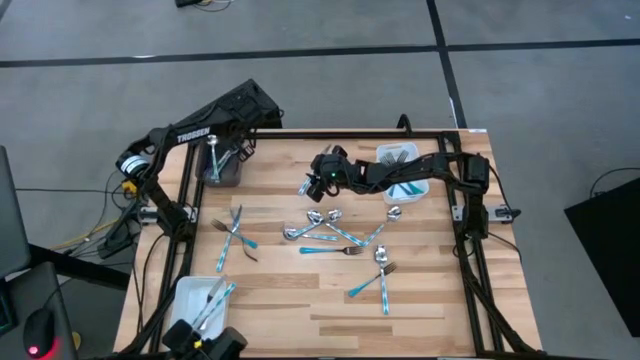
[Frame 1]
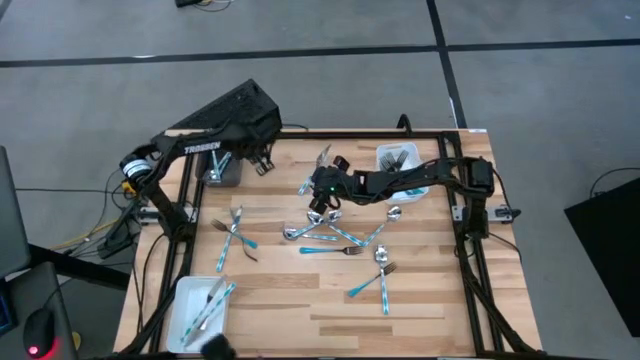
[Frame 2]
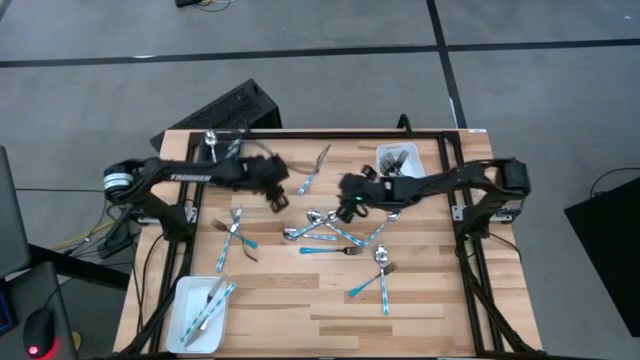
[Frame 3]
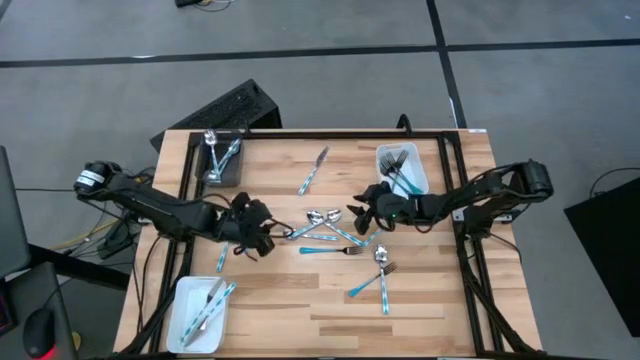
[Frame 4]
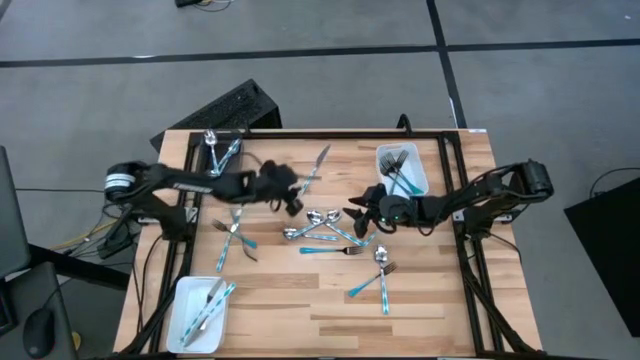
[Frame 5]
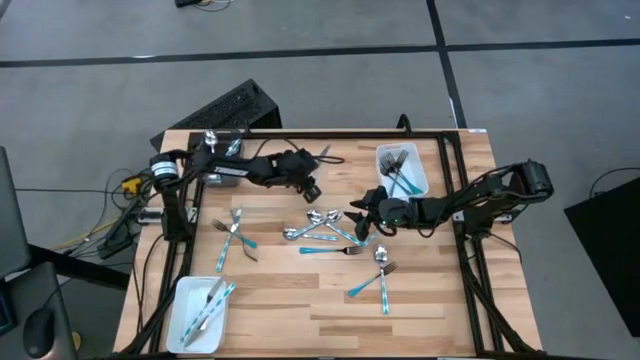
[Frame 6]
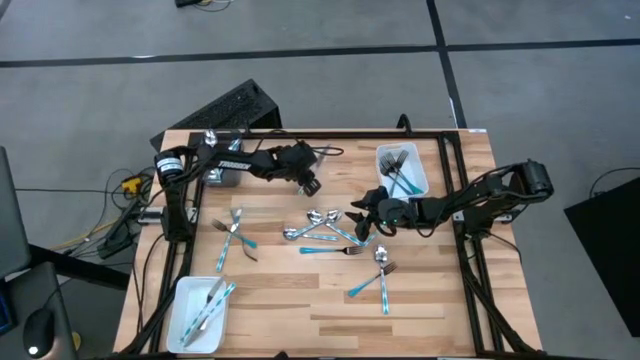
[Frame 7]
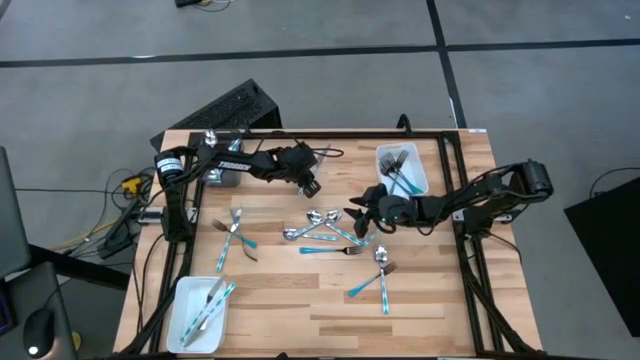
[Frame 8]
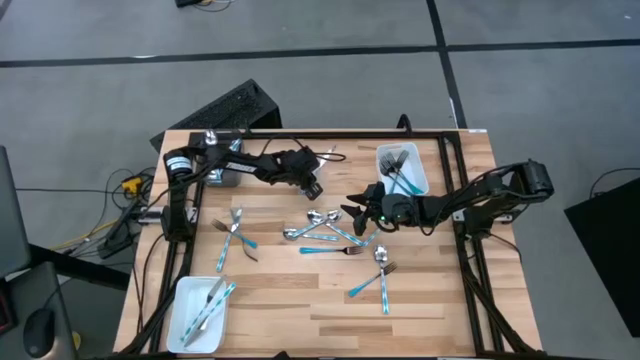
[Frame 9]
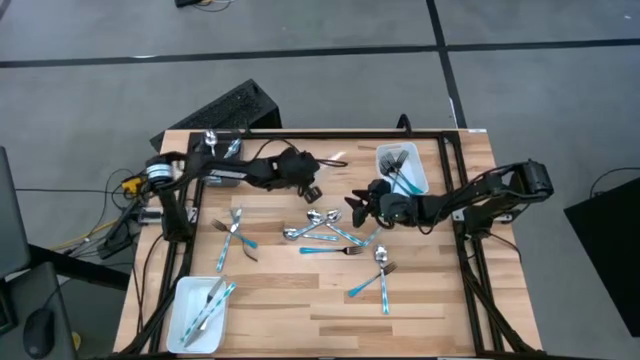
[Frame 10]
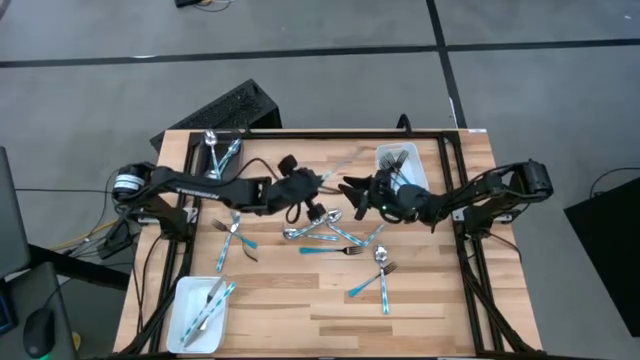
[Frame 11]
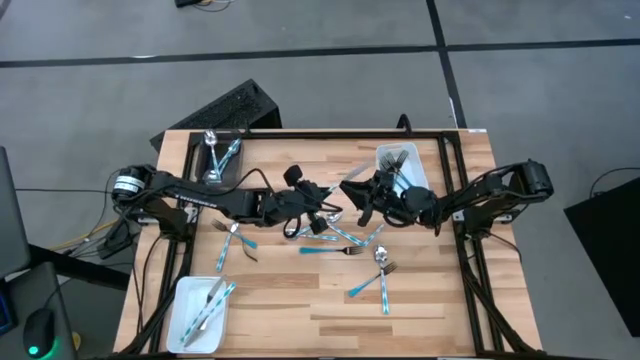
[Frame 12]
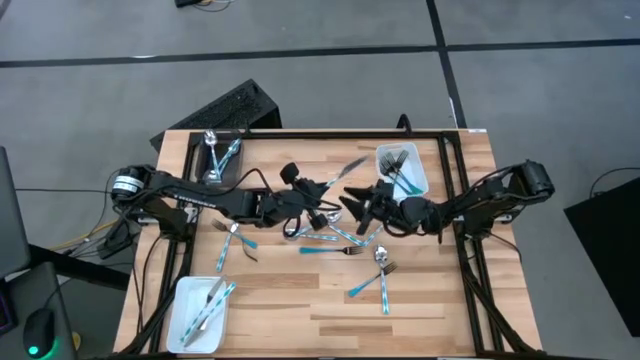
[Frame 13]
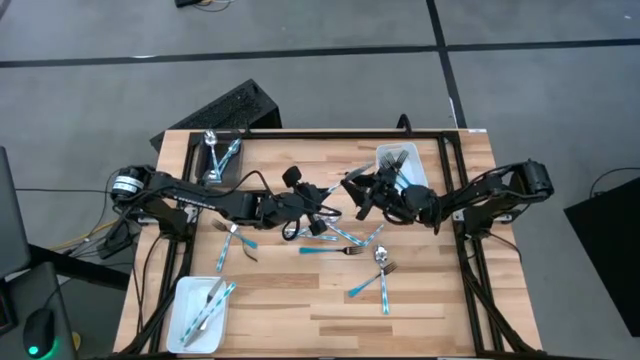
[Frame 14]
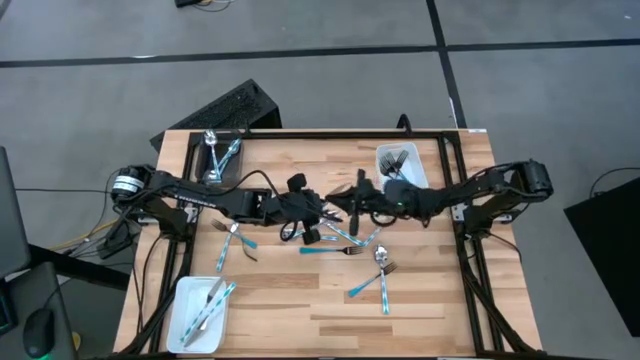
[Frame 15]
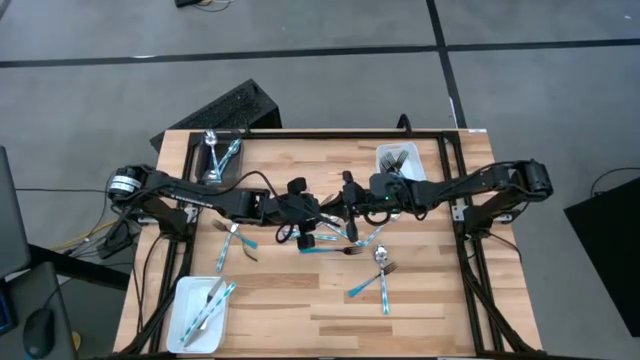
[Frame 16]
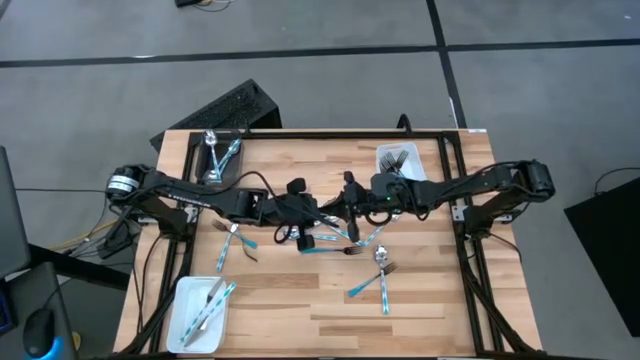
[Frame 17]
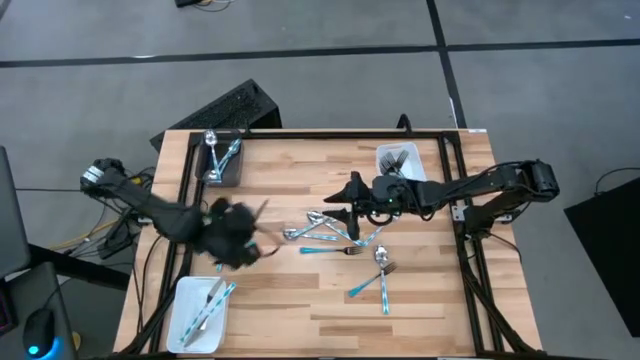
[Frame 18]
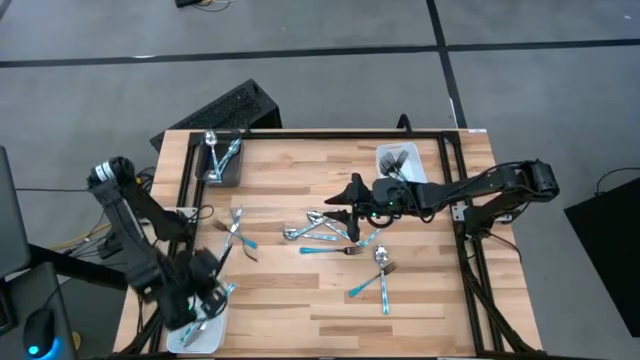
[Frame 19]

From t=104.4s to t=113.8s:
Task: Sort silverware by color (type)
Put the blue light table knife into the bottom white bin

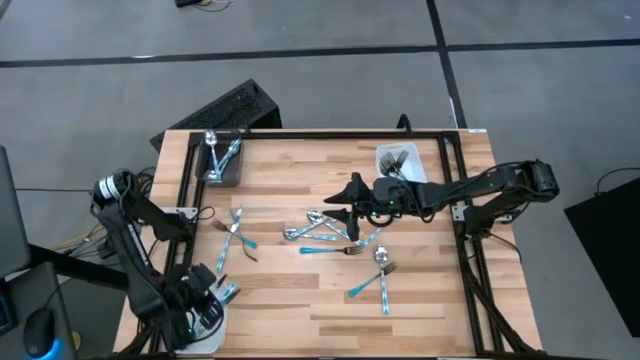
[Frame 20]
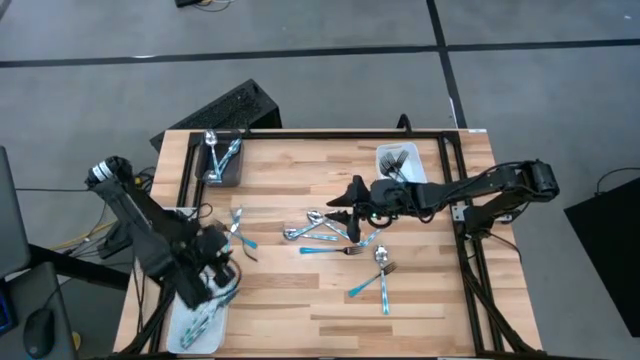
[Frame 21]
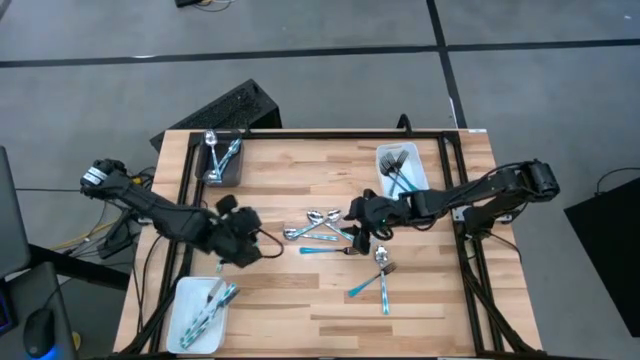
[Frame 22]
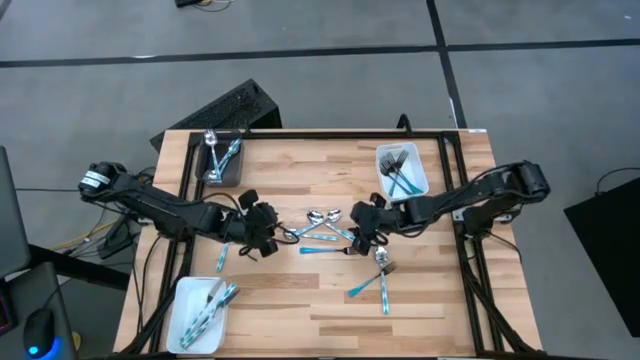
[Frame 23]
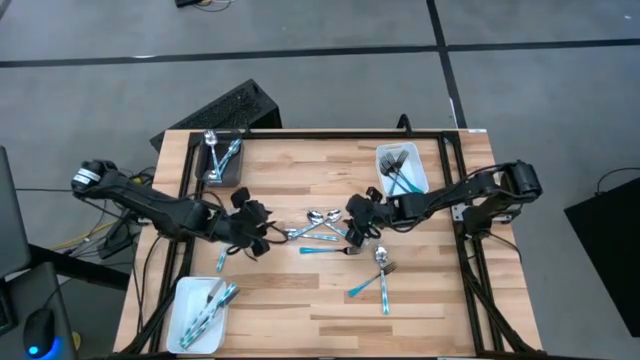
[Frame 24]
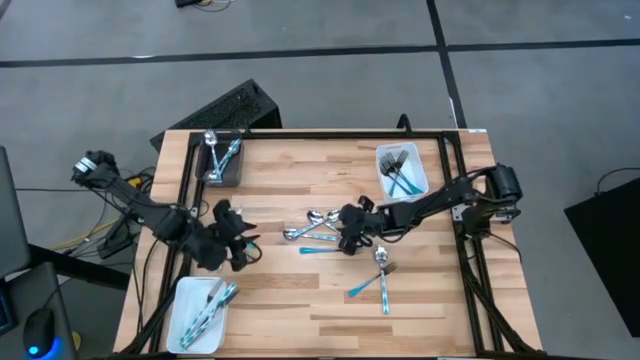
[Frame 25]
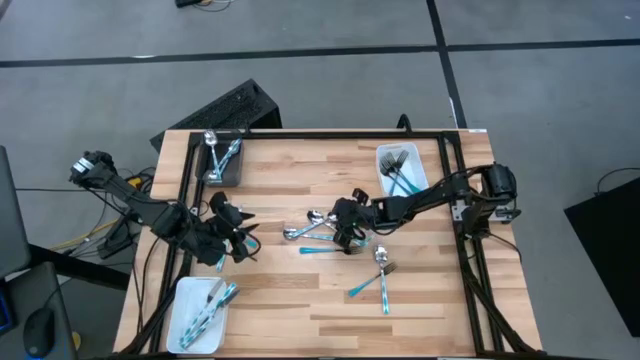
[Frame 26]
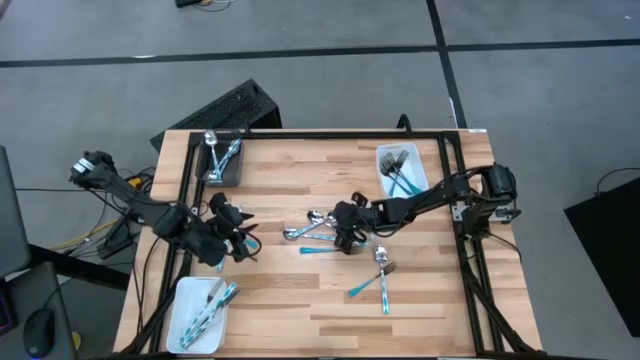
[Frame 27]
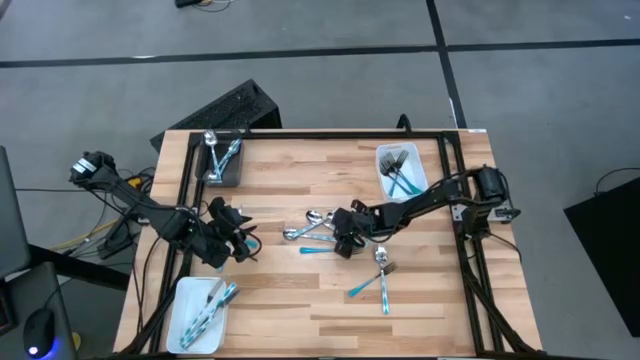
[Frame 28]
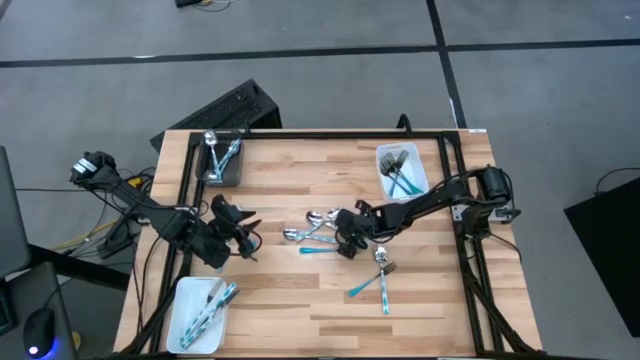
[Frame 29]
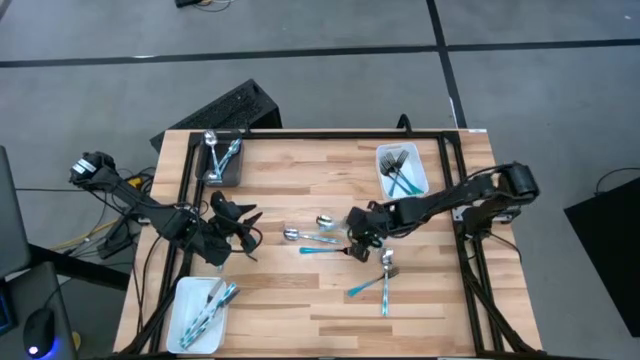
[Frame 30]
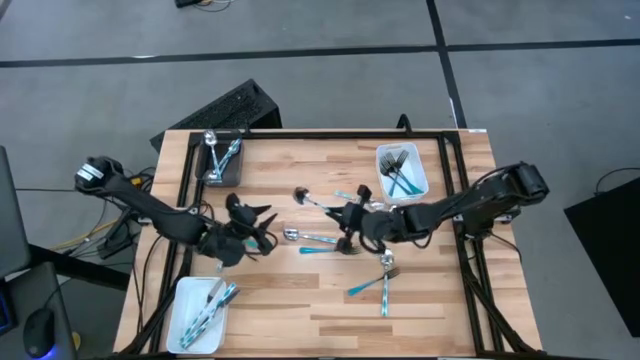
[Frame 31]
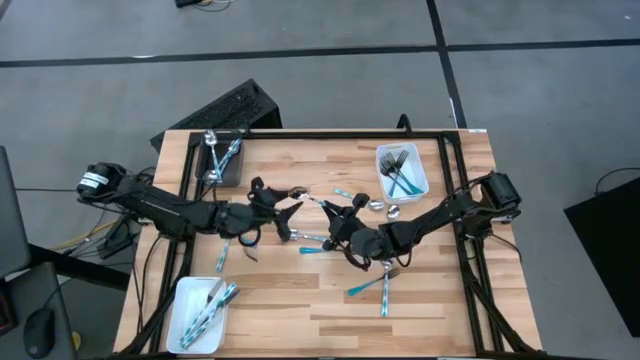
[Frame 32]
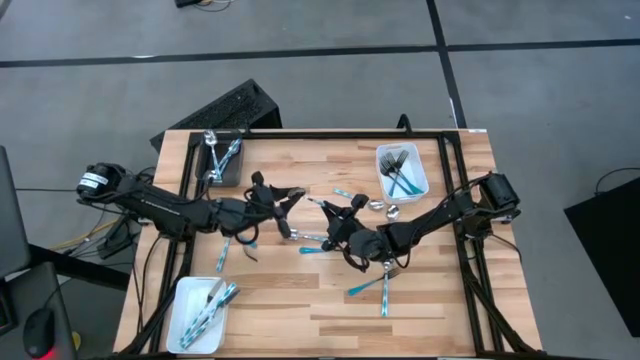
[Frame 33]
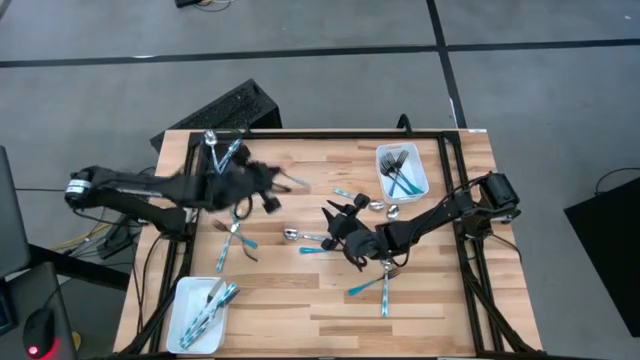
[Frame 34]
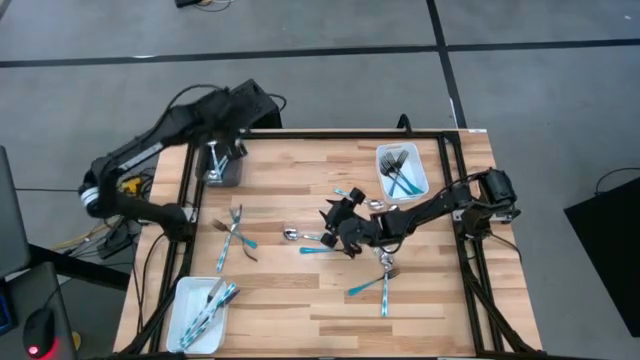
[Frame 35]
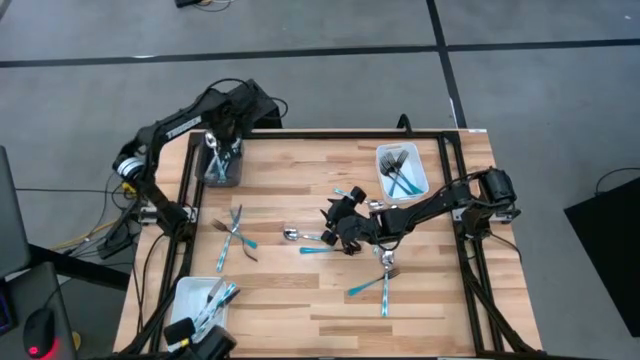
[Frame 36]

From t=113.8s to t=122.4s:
Put the light blue spoon into the black bin

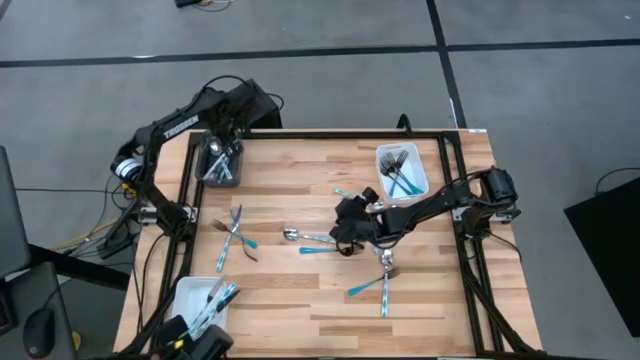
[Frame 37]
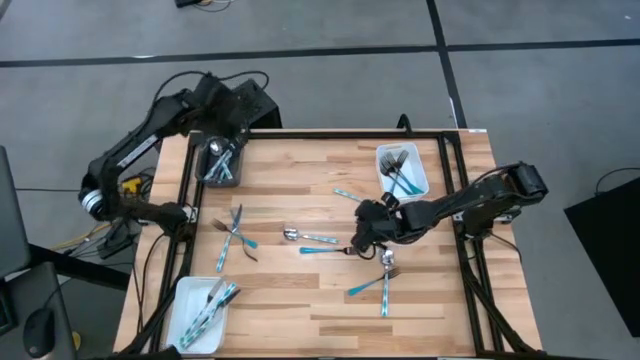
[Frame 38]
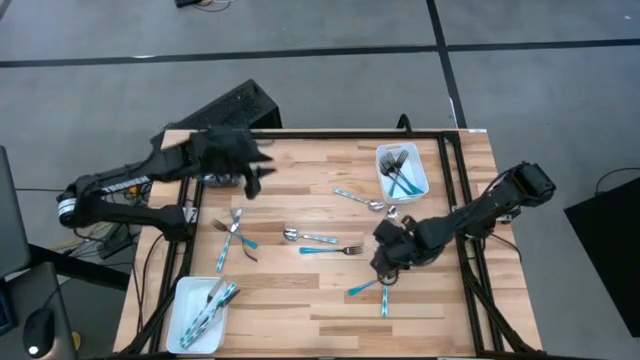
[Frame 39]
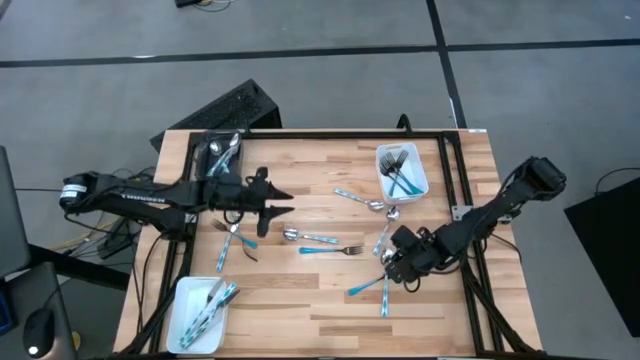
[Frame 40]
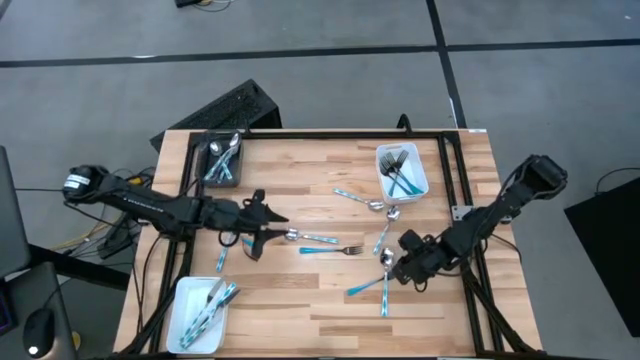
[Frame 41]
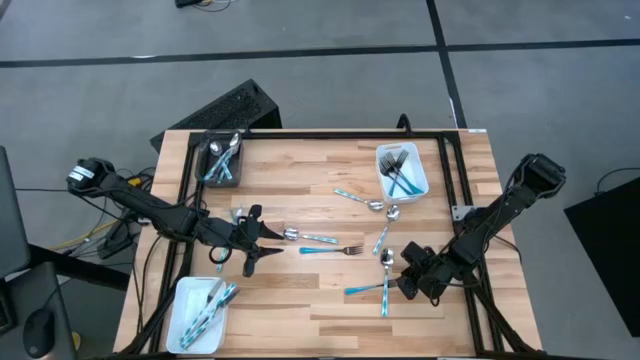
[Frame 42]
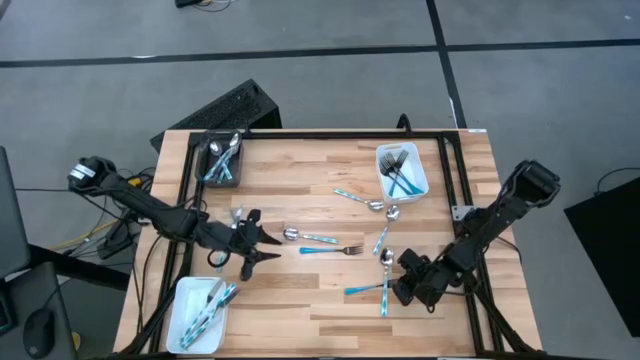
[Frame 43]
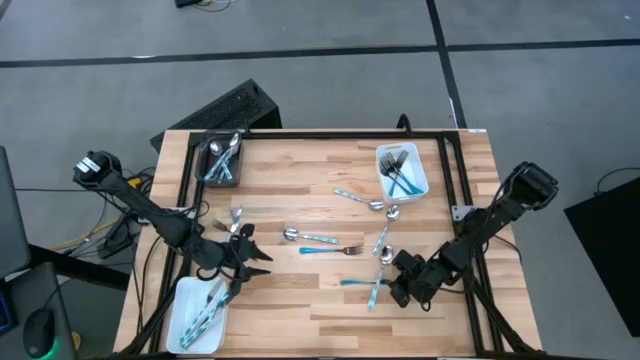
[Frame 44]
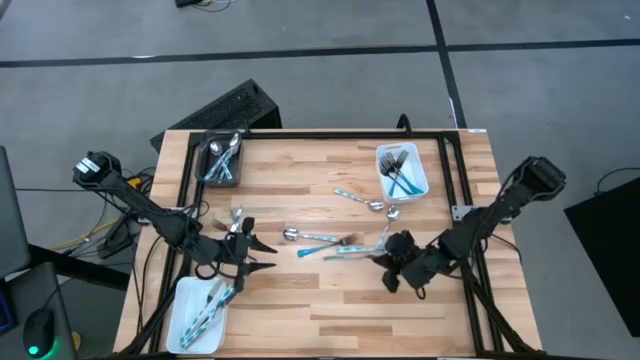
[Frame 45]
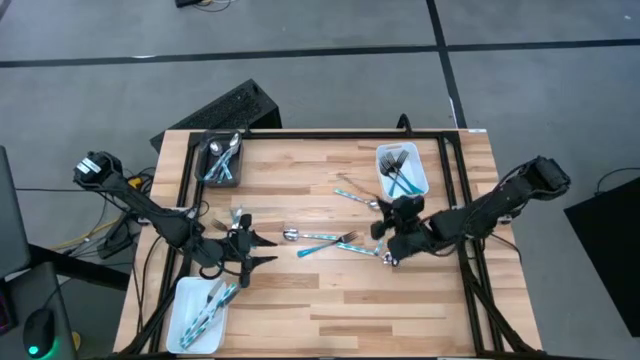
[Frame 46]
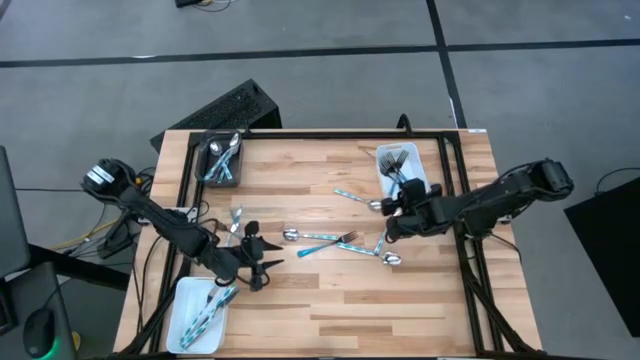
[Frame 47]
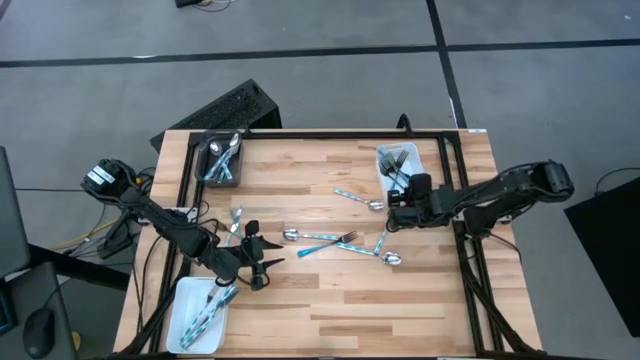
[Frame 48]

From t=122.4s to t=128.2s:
Put the blue fork into the top white bin
